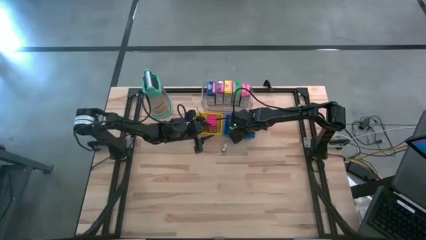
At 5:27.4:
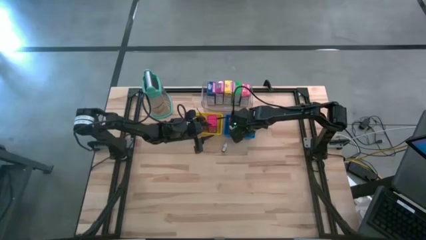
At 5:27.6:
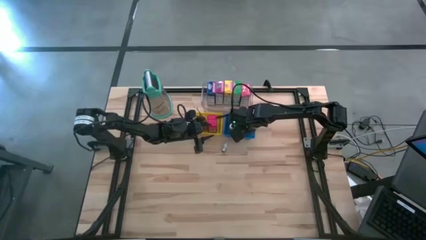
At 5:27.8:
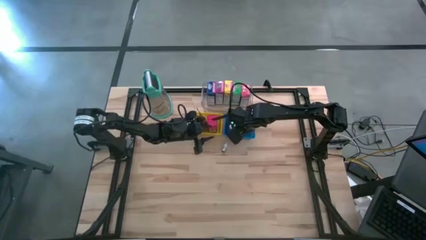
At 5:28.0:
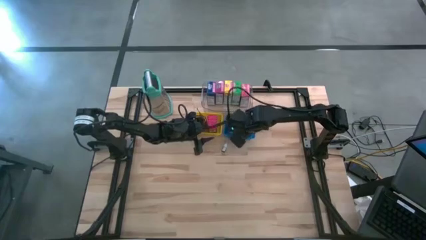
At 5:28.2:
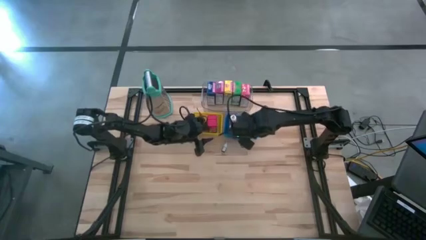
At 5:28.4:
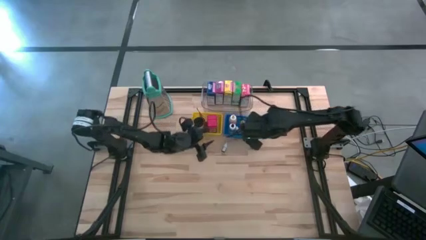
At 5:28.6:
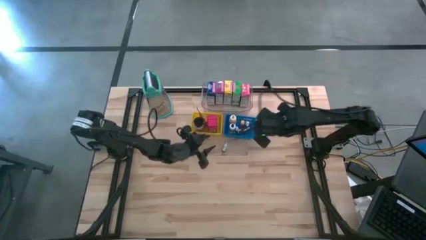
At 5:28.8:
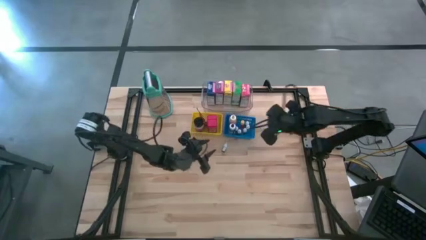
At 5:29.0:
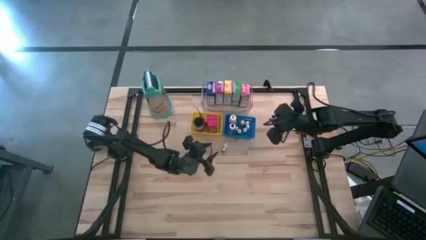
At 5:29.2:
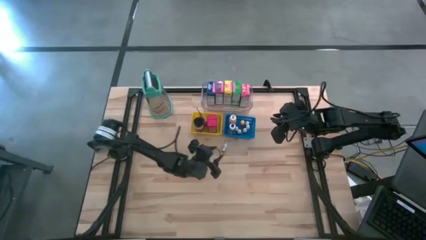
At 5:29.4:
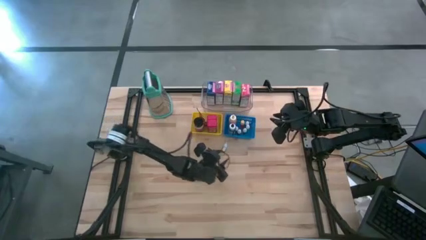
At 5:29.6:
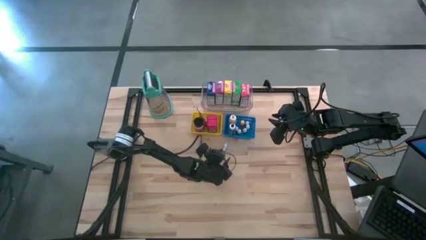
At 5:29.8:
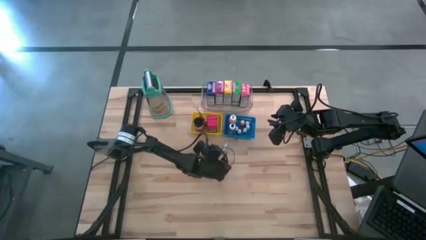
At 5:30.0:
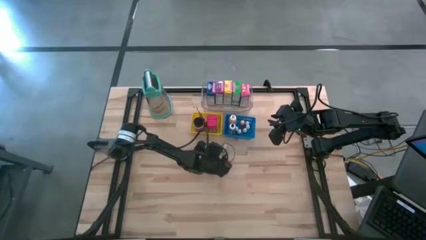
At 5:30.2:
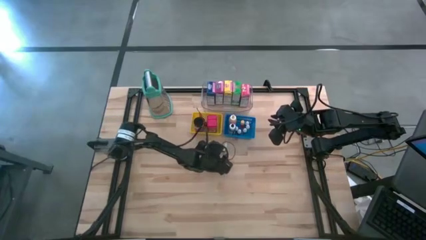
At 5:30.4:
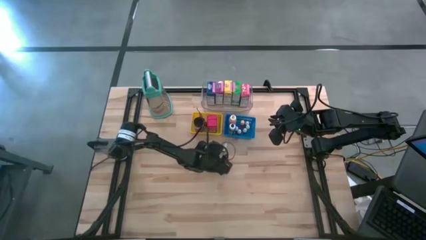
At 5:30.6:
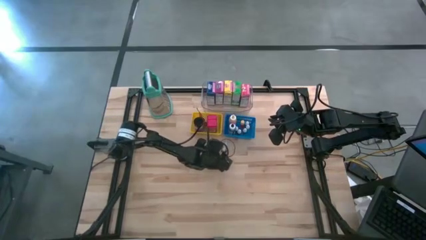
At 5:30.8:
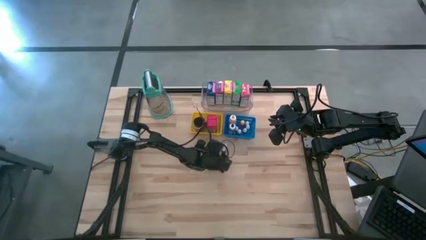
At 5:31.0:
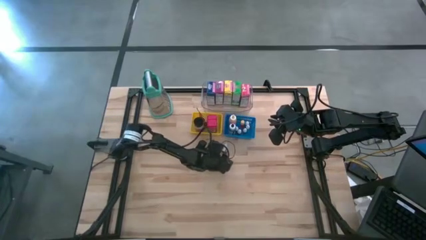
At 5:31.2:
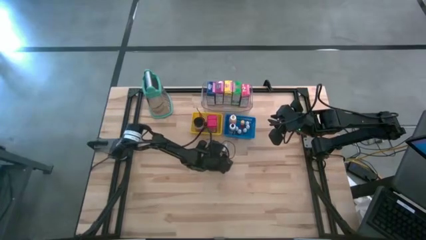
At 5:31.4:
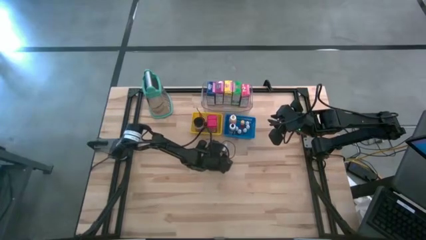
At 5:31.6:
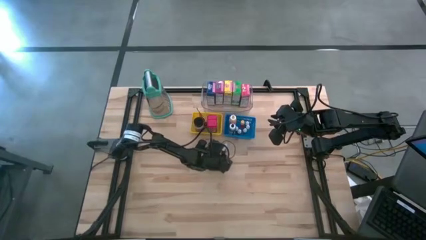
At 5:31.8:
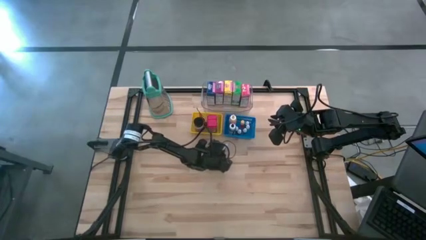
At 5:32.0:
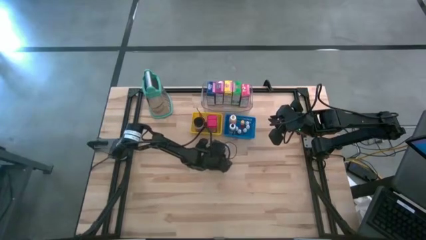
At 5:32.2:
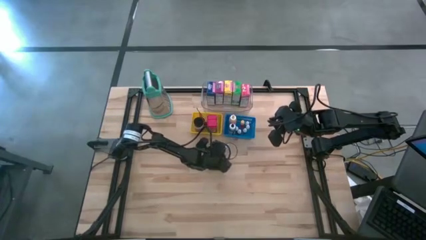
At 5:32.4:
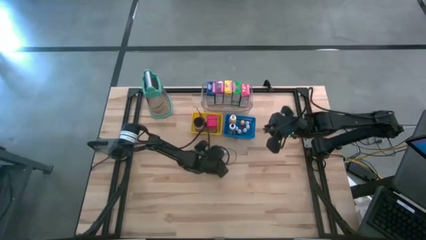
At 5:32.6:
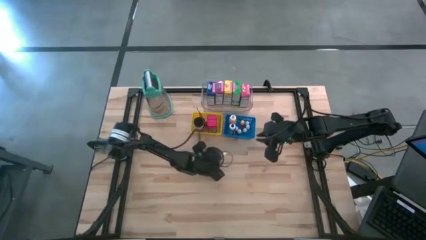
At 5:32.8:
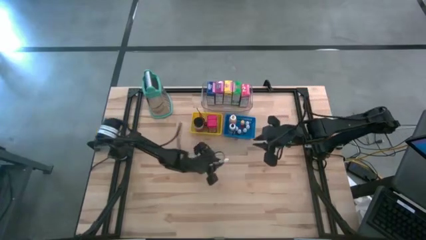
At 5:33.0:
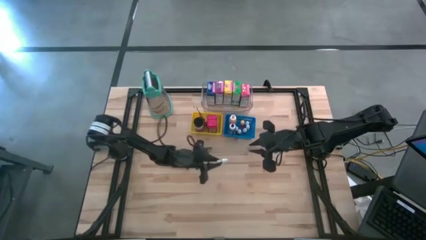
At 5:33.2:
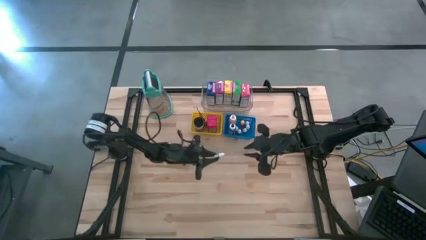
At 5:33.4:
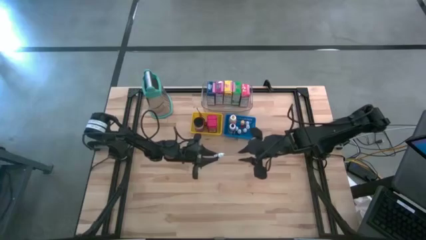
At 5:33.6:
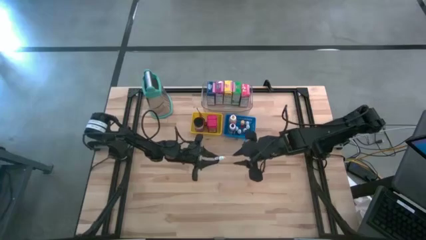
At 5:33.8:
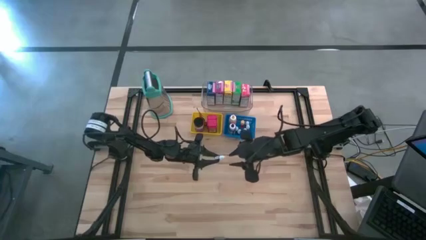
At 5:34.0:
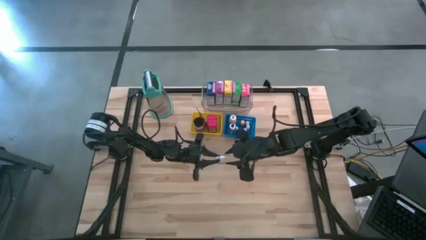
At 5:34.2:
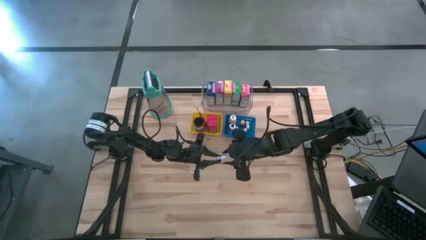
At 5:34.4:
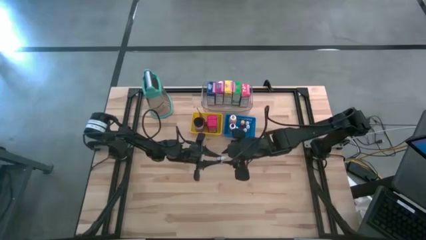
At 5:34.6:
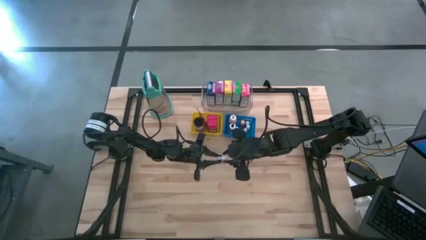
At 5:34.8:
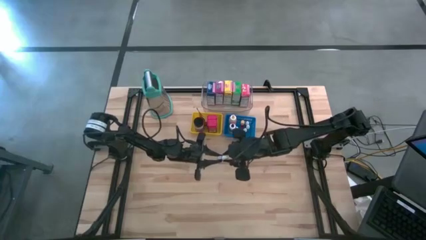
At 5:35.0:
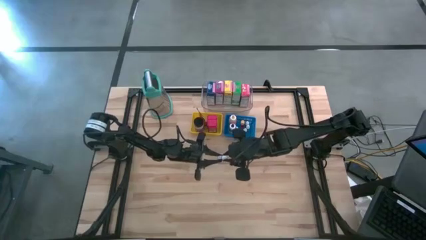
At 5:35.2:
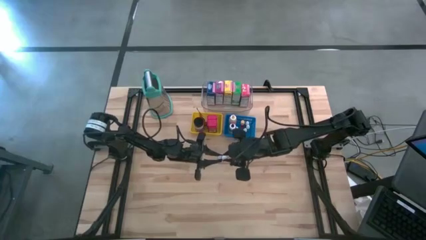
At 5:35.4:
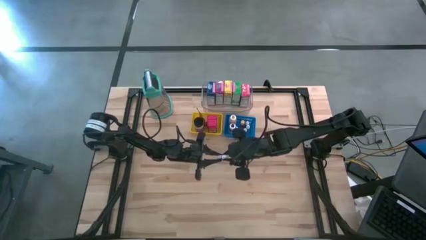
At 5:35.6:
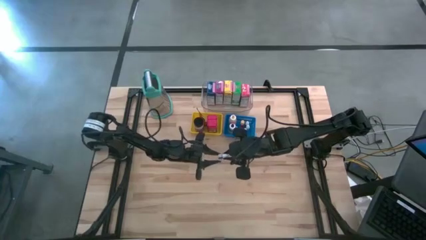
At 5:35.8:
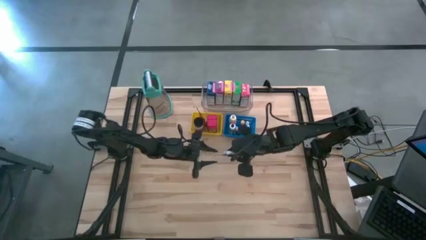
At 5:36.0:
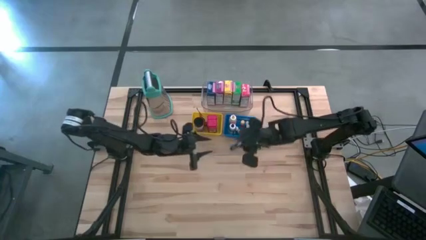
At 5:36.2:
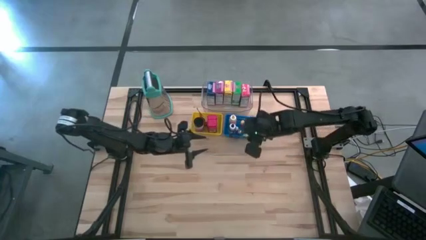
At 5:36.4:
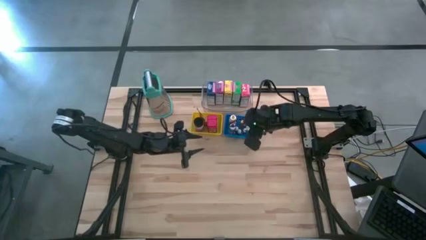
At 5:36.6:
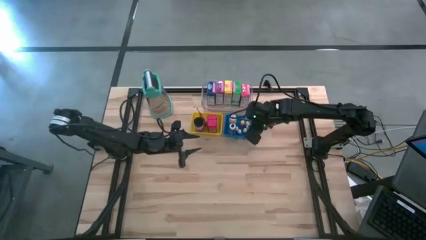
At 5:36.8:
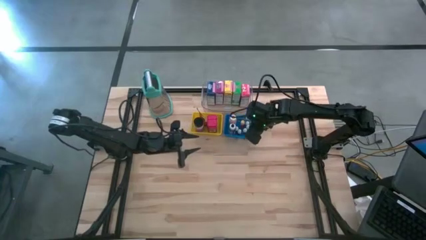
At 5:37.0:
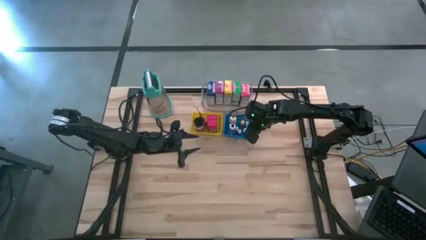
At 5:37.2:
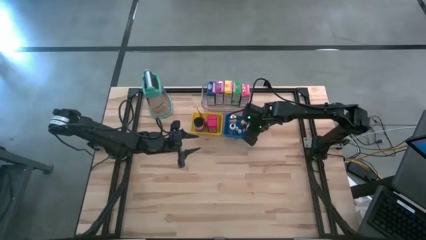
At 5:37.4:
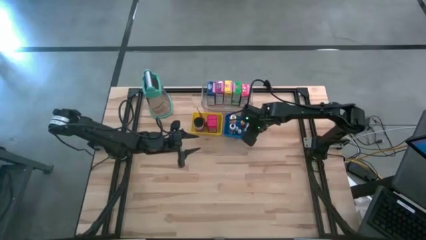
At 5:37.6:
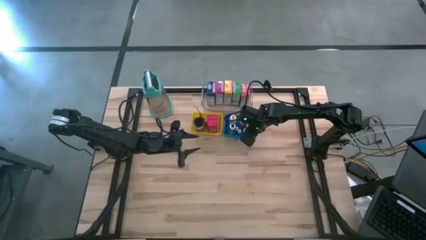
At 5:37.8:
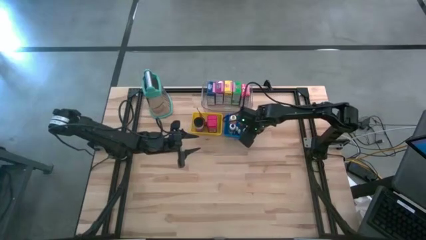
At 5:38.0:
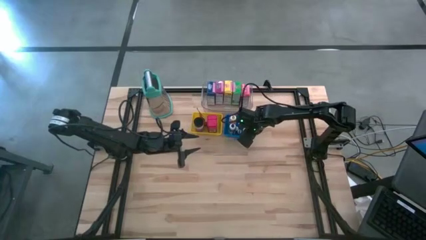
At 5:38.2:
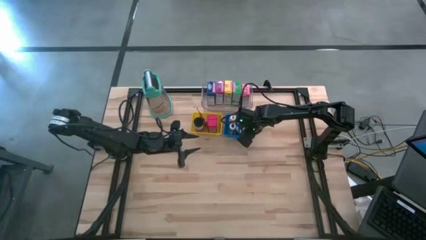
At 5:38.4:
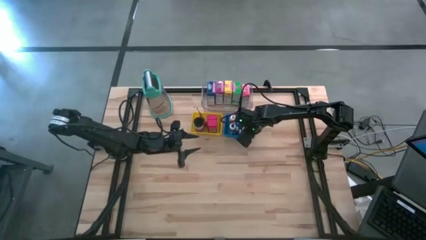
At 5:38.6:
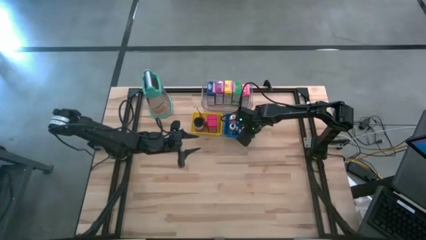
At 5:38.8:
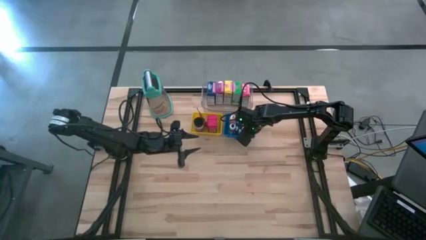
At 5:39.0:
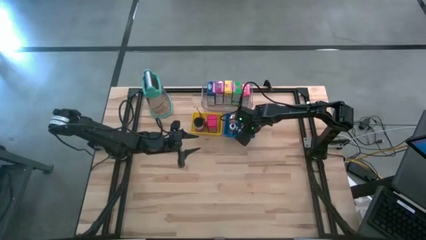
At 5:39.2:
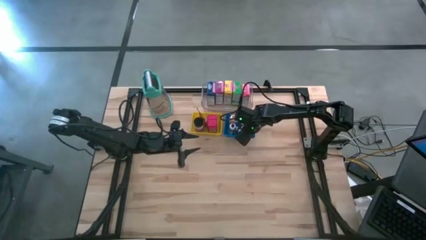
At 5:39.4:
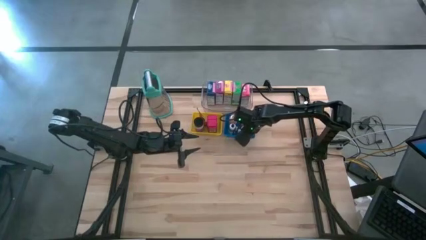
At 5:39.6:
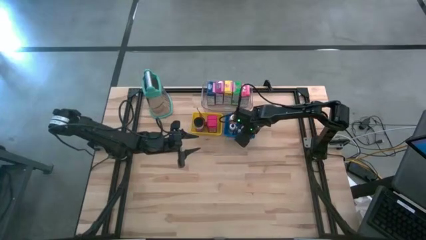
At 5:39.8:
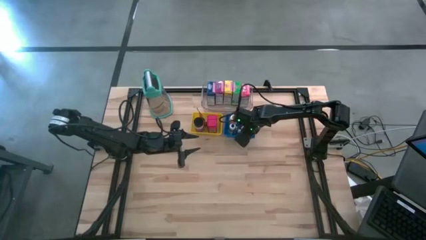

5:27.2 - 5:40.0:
Task: Pick & Place Kitchen Items
Put the small black food coloring bottle into the blue bin

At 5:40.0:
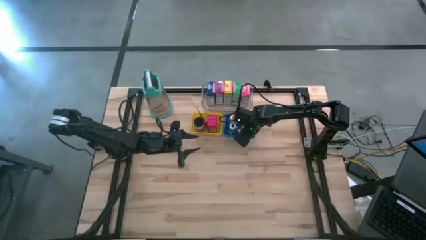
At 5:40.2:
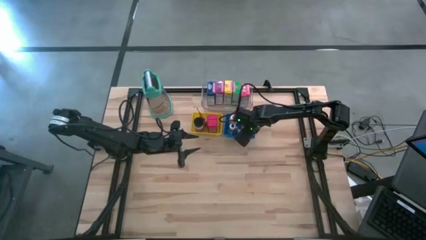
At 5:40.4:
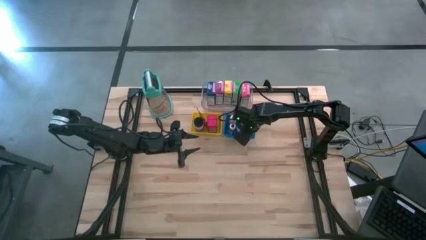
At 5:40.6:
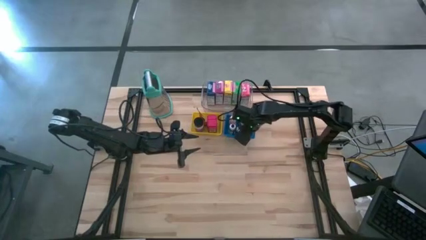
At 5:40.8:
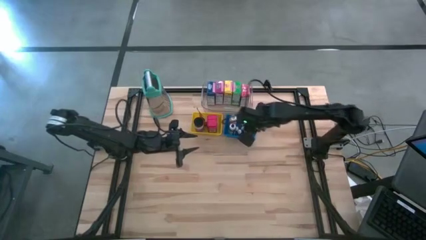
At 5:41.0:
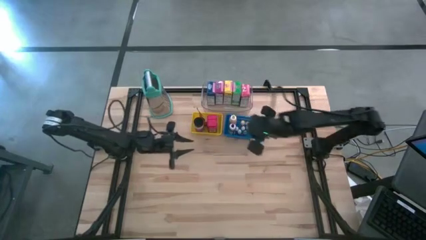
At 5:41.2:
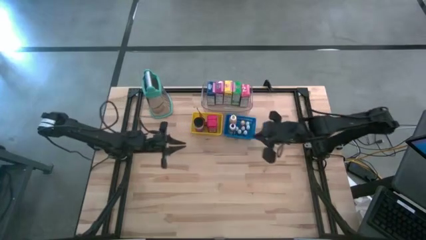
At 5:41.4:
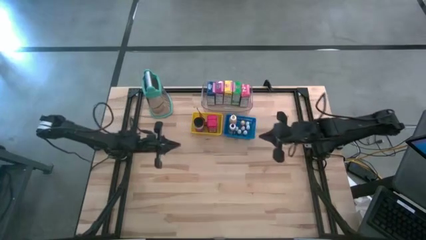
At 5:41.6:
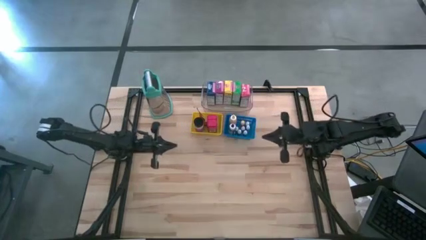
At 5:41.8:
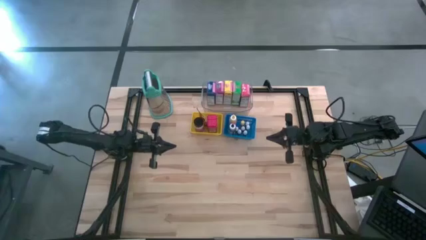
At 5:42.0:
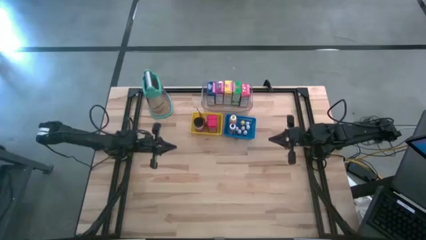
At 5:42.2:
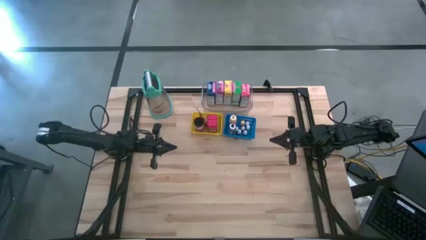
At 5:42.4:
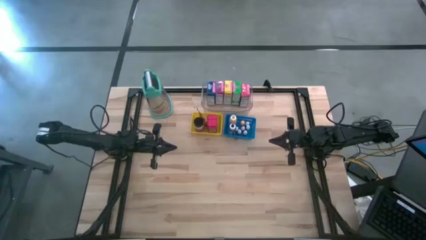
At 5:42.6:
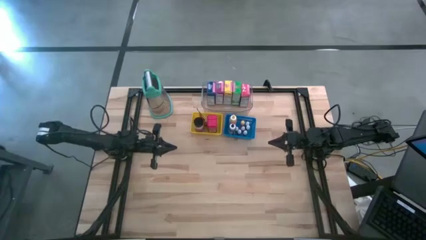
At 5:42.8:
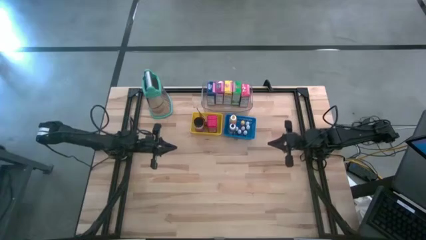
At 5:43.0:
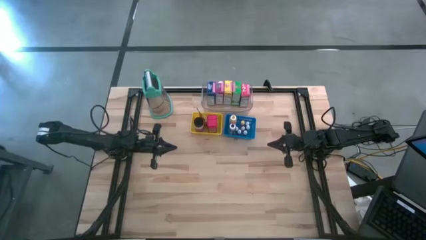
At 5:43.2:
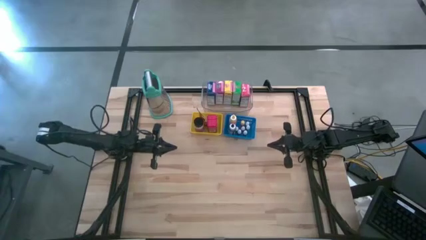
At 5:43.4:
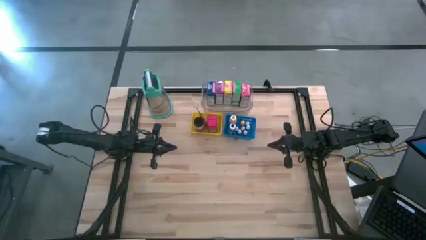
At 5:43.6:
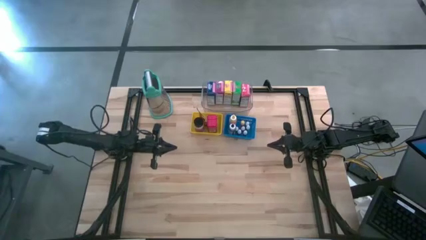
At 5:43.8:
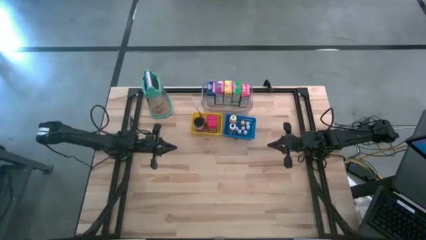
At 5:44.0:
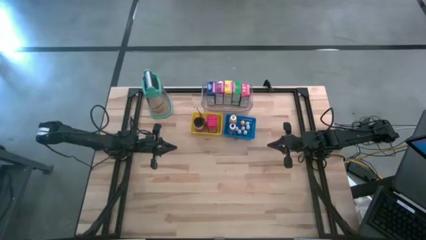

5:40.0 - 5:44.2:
Return to Home Position
